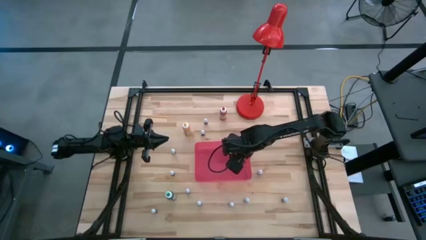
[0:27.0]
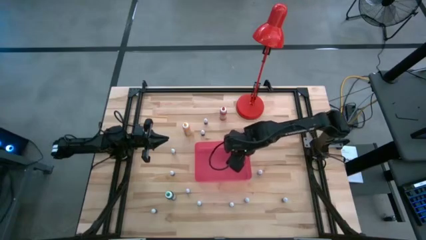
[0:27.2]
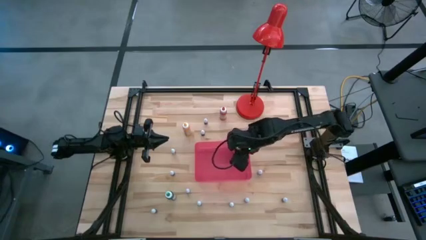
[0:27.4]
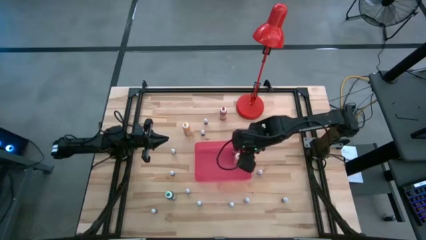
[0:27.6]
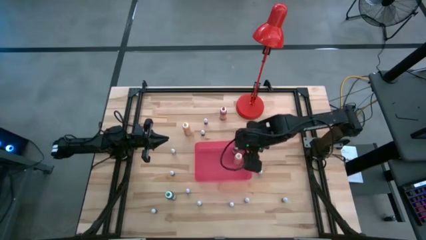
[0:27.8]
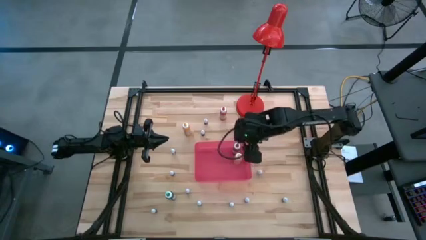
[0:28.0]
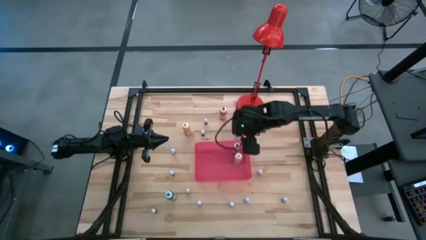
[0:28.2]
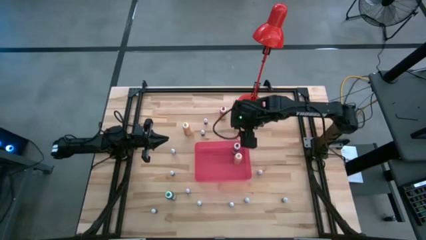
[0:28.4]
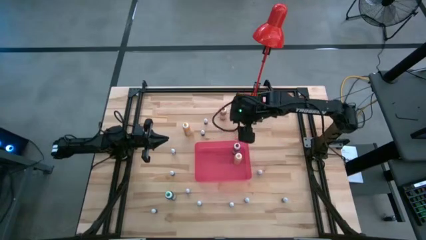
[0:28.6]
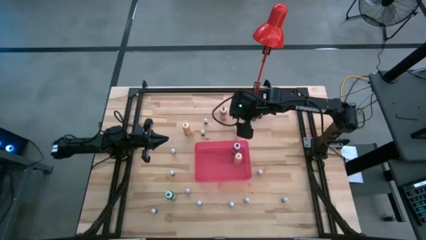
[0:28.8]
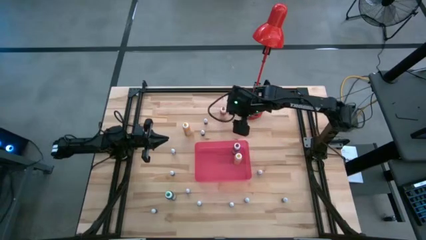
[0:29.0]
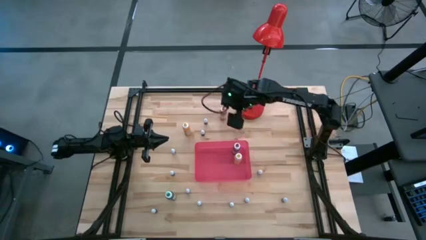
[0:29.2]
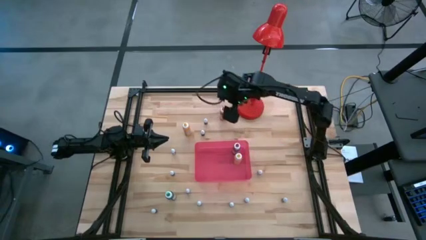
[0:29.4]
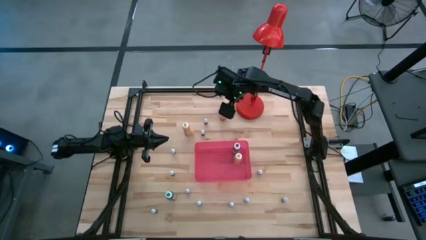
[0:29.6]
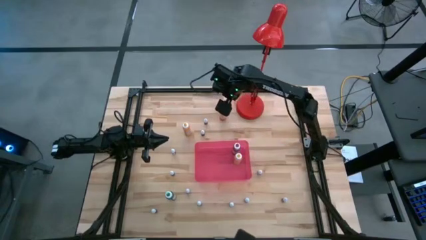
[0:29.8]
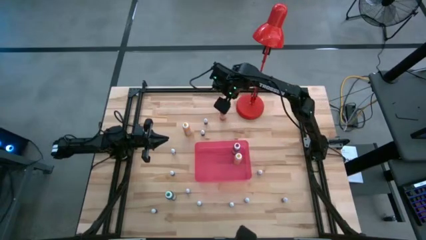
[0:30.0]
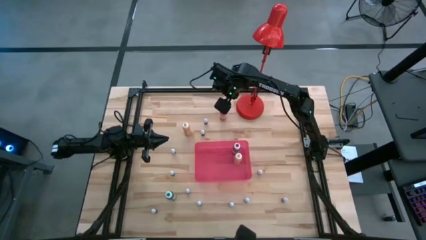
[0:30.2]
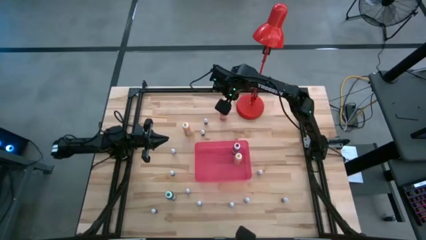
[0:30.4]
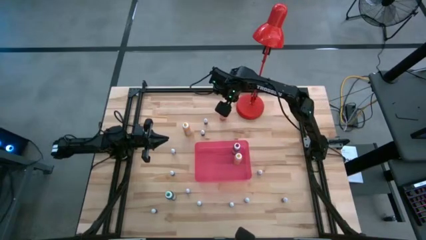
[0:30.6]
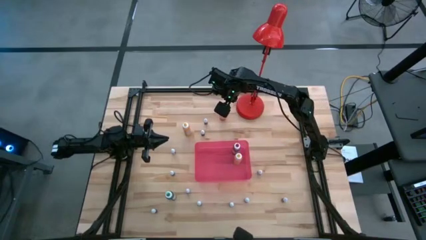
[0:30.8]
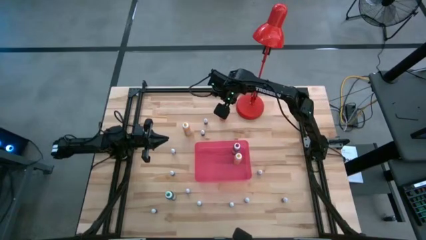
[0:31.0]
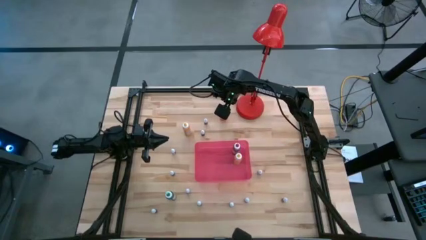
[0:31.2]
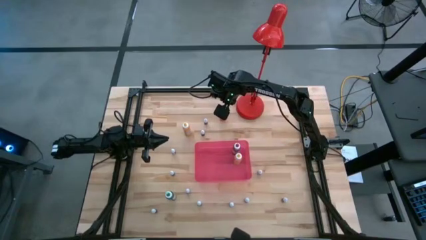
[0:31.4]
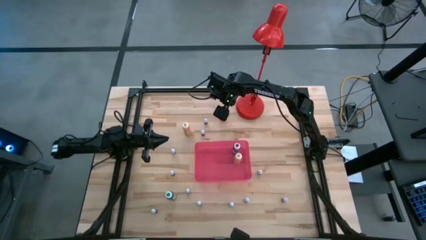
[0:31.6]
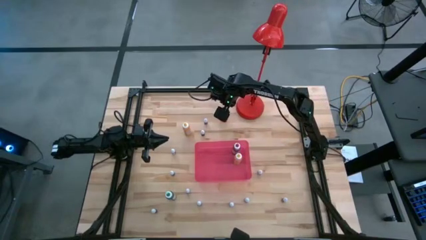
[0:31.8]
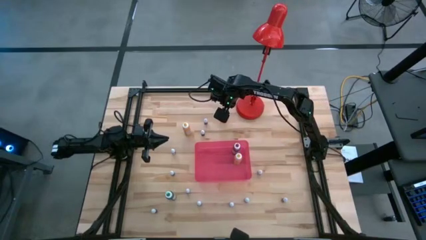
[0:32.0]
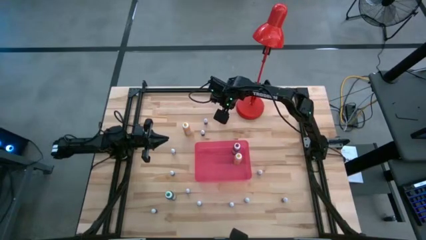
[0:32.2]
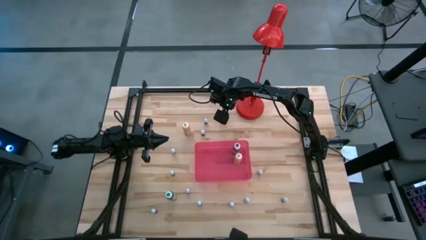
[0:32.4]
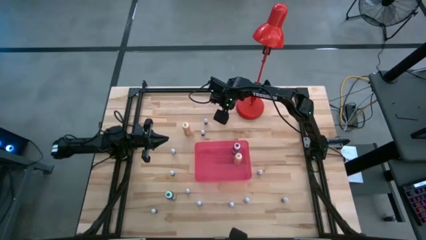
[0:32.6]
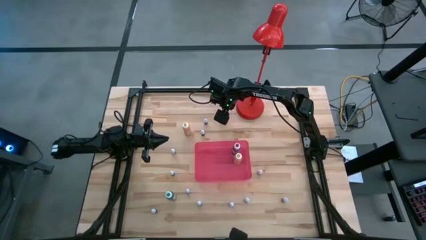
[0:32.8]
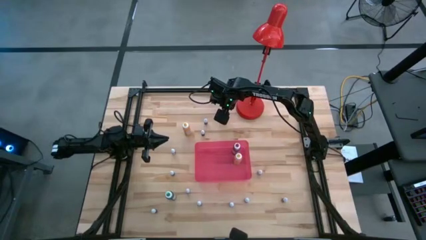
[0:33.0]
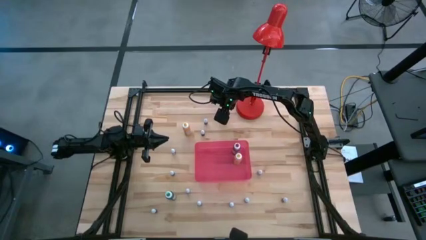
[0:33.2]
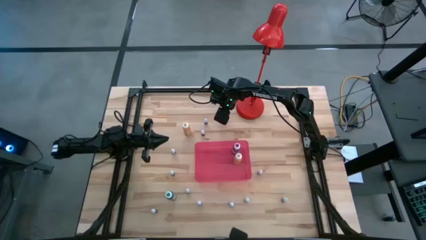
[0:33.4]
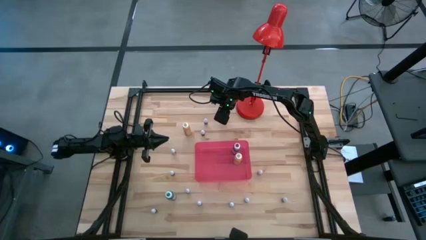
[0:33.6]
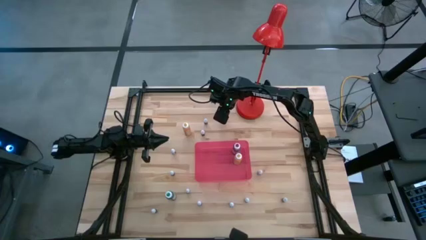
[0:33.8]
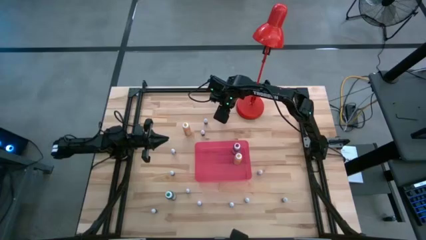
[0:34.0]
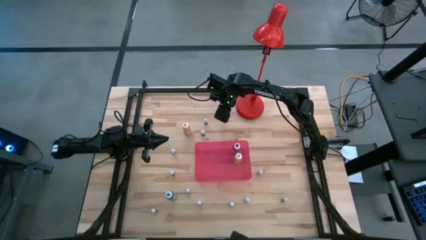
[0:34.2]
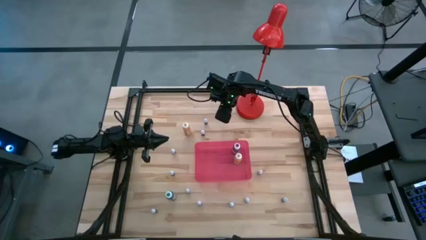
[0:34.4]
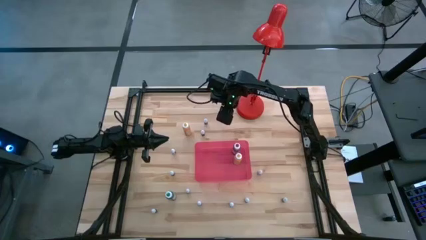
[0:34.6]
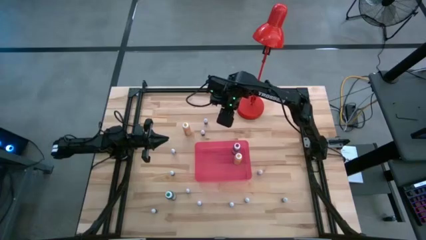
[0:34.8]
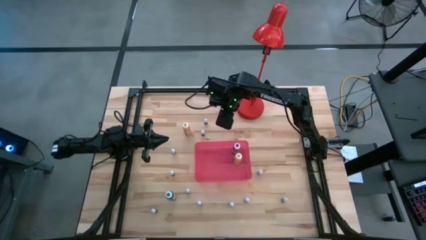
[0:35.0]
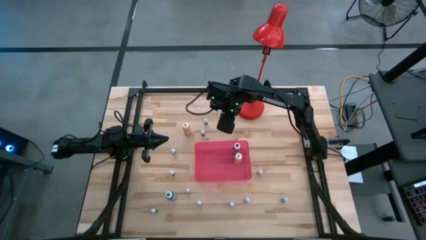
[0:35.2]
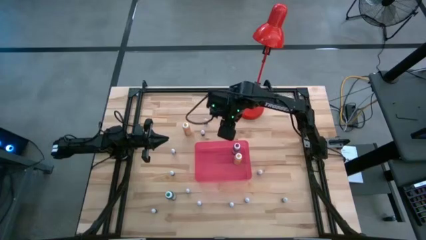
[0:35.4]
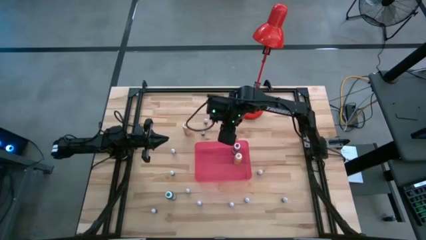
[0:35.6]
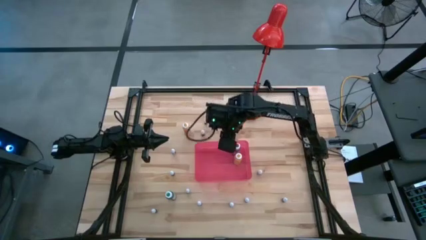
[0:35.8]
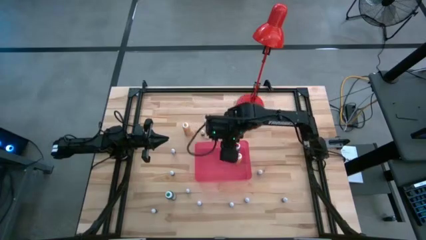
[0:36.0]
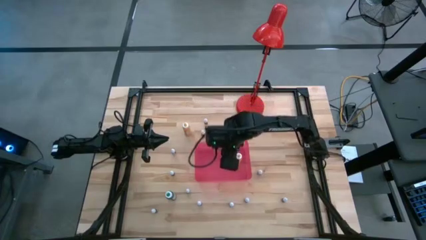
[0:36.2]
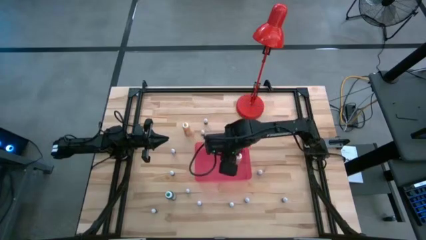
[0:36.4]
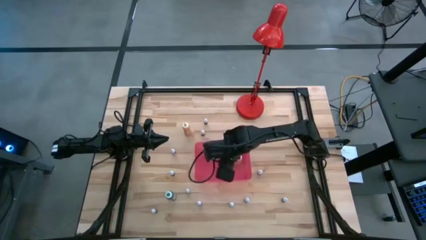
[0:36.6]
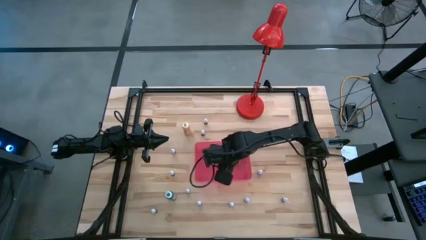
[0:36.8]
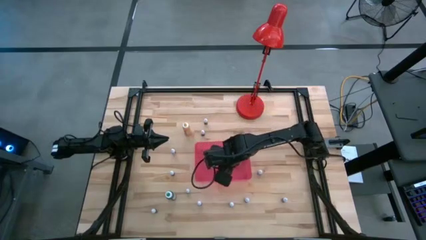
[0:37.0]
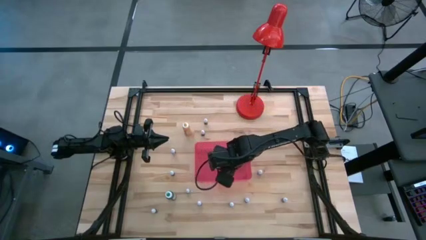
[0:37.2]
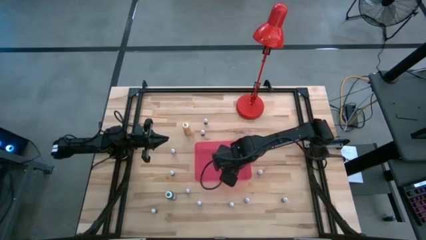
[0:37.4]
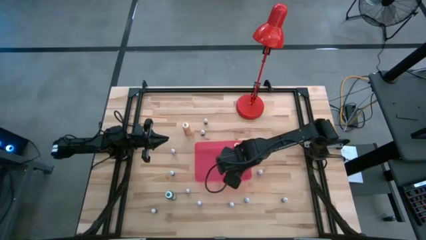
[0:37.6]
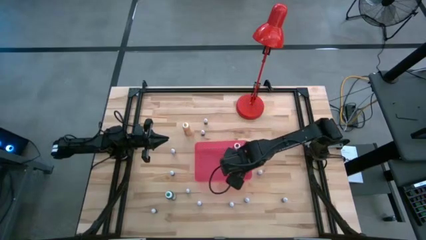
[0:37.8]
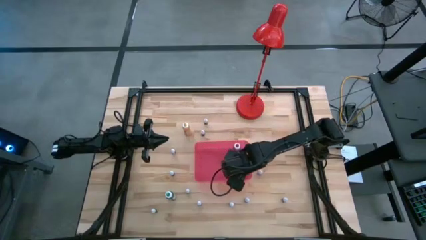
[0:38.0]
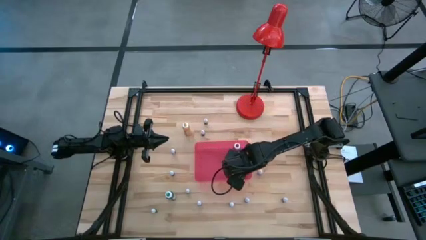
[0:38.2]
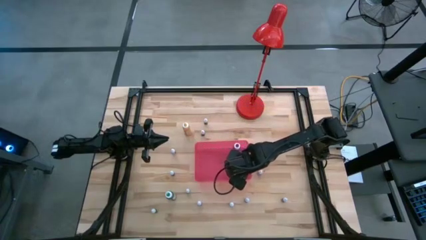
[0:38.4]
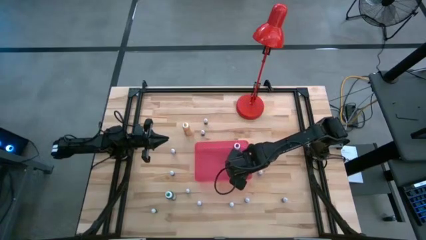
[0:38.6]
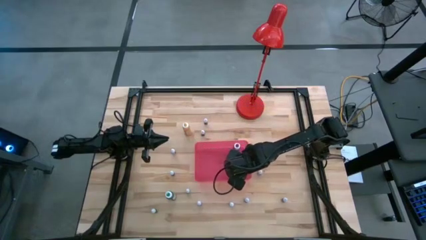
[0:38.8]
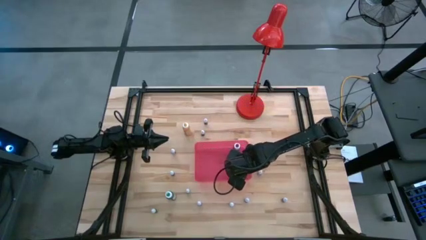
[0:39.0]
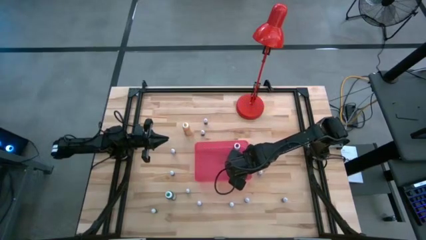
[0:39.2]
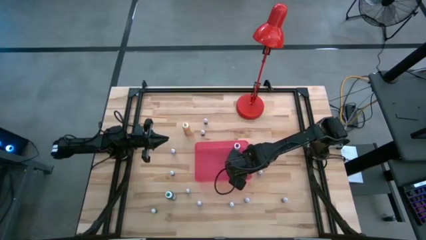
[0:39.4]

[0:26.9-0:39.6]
Task: Pick & Place food coloring
Put the large orange food coloring bottle into the red bin
